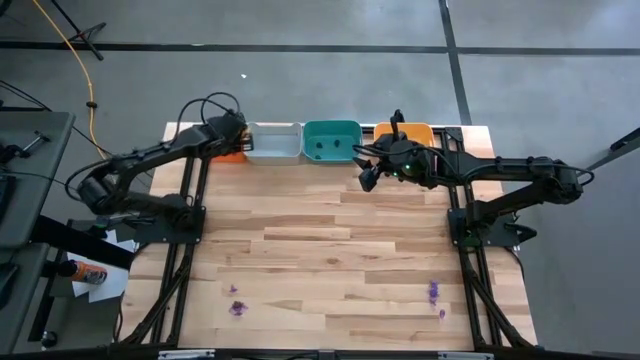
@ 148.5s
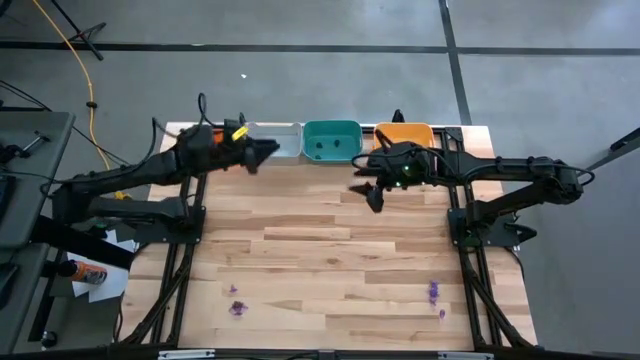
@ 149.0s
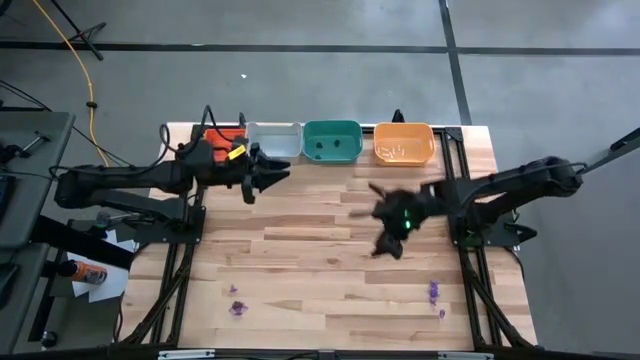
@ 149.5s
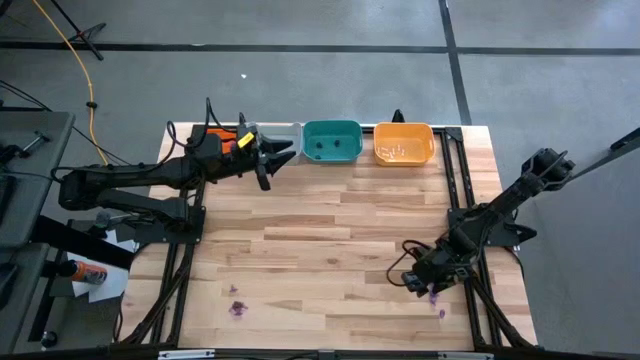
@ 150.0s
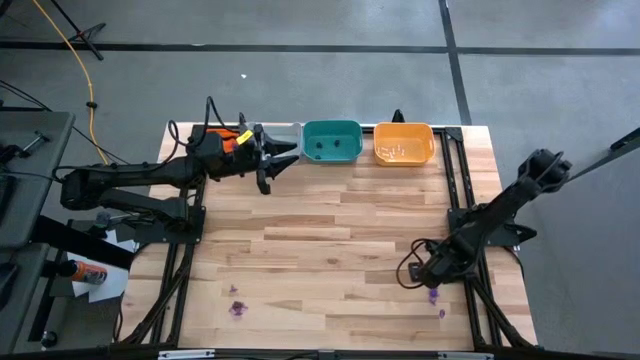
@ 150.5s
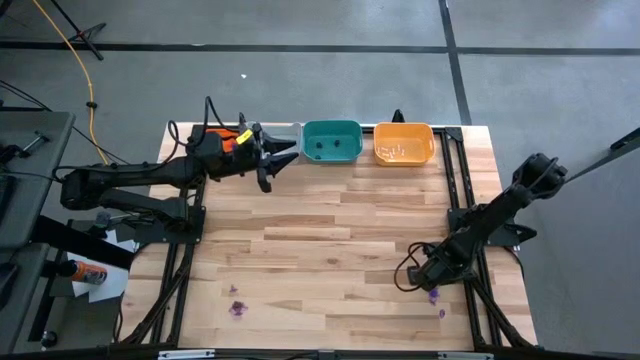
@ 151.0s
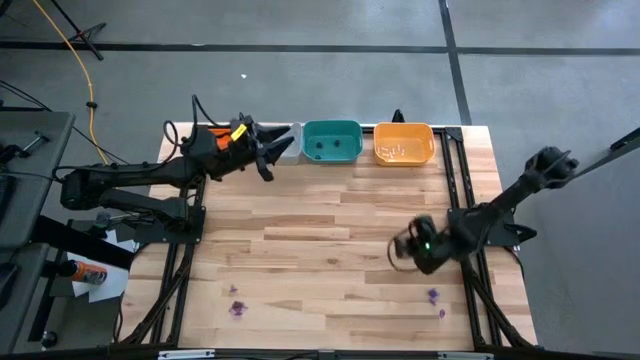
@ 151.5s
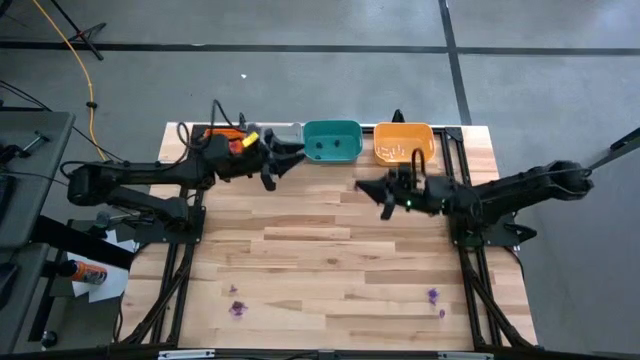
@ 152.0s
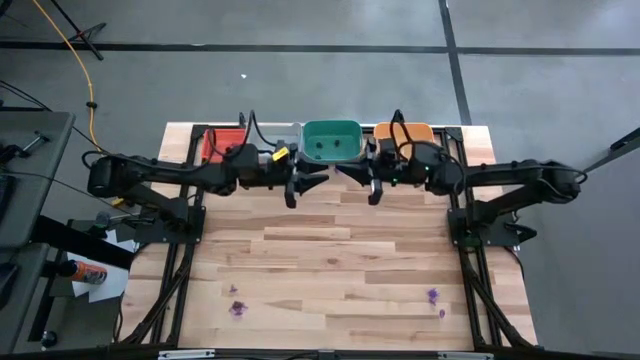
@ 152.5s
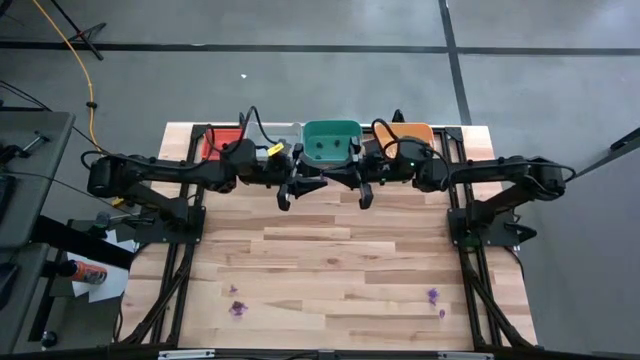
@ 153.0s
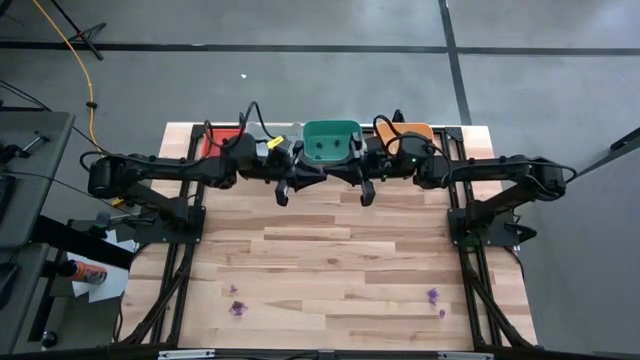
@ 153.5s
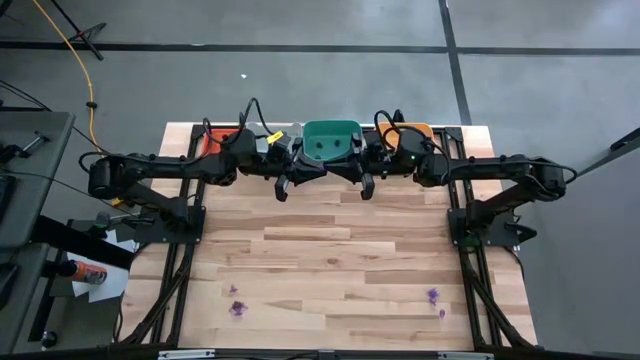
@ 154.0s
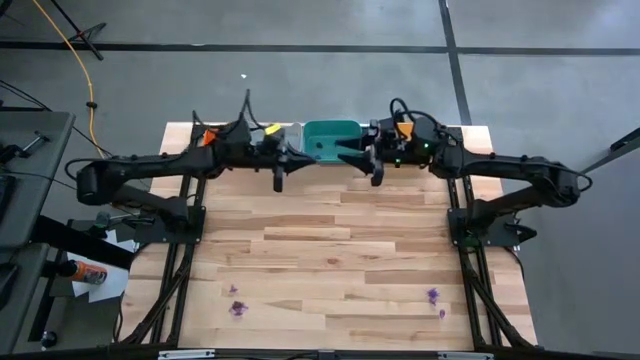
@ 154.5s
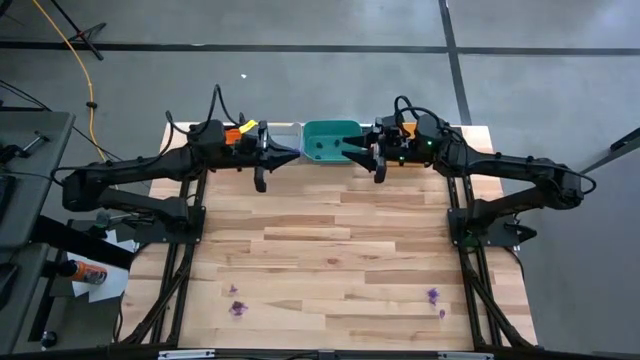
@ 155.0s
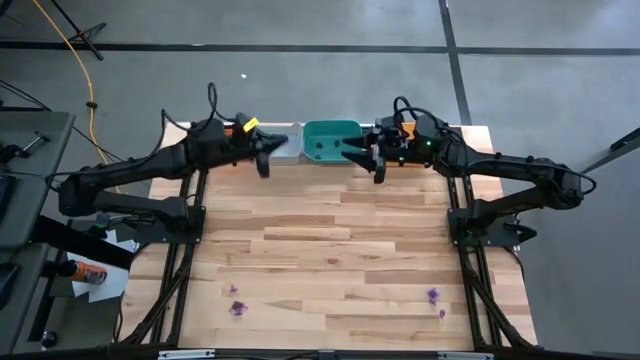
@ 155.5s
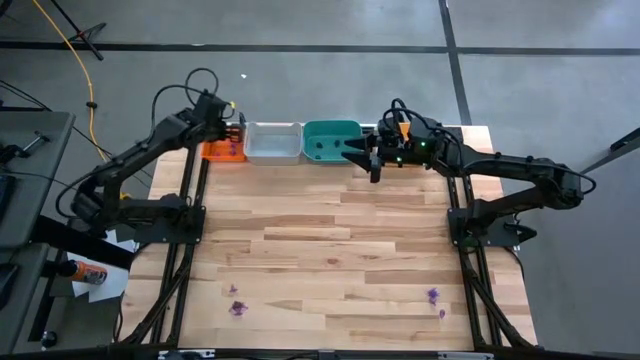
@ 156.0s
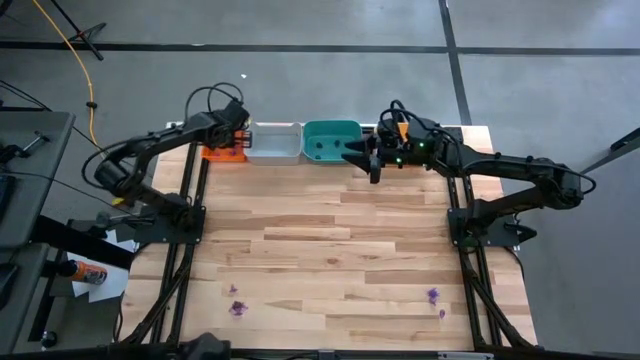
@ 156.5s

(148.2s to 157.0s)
Task: Sort Halloween decoration
Put the violet spider into the orange bin

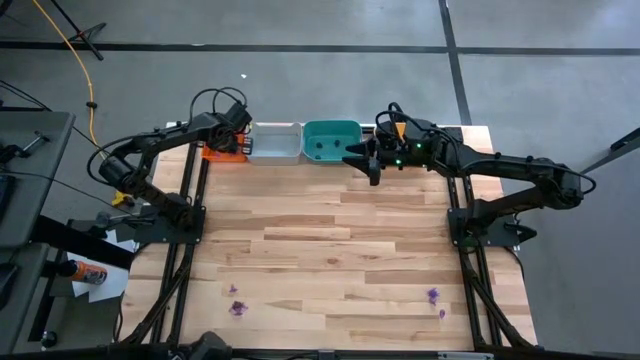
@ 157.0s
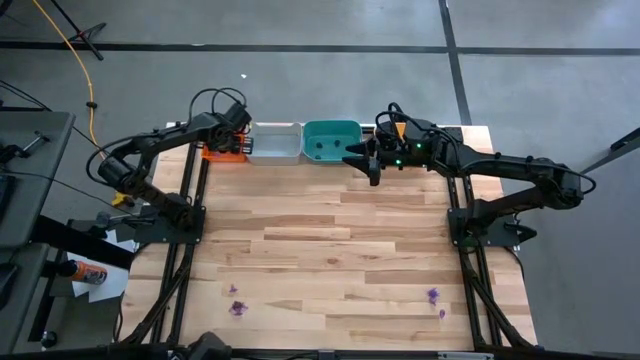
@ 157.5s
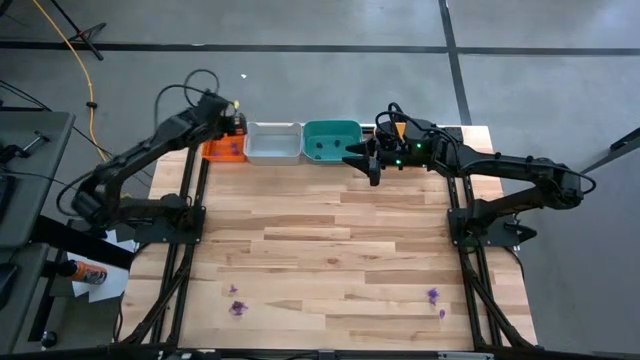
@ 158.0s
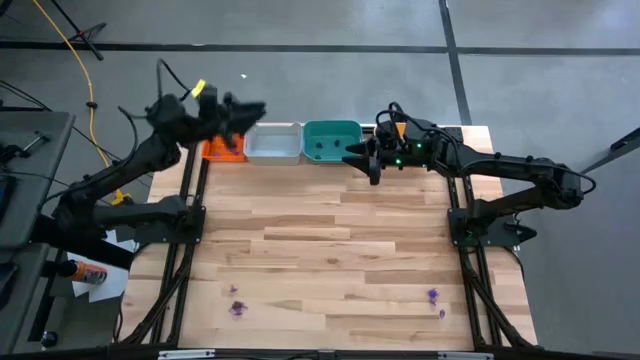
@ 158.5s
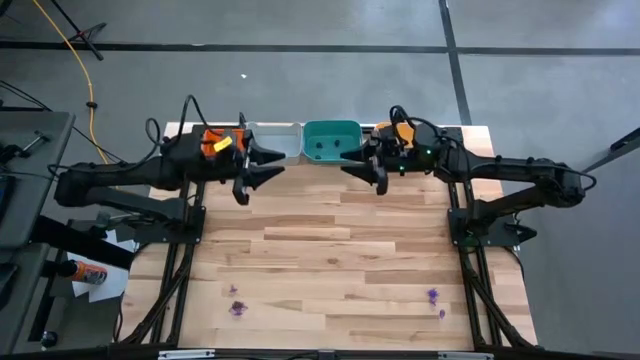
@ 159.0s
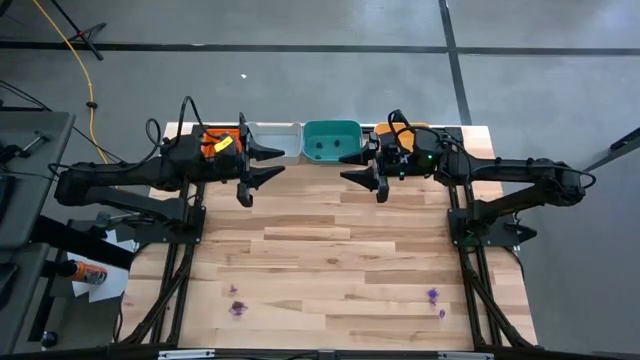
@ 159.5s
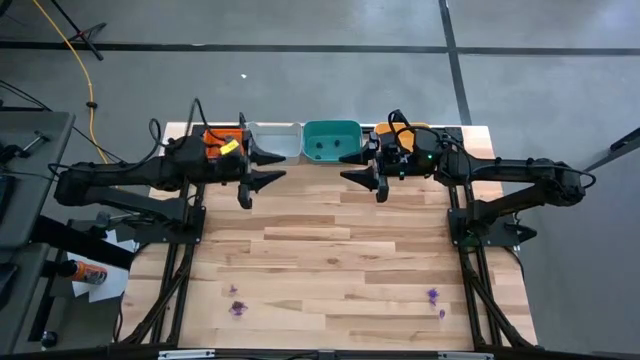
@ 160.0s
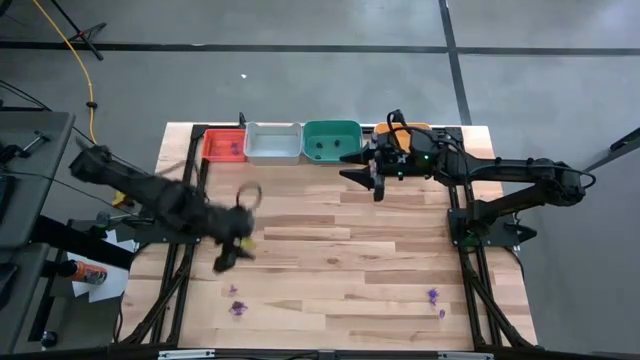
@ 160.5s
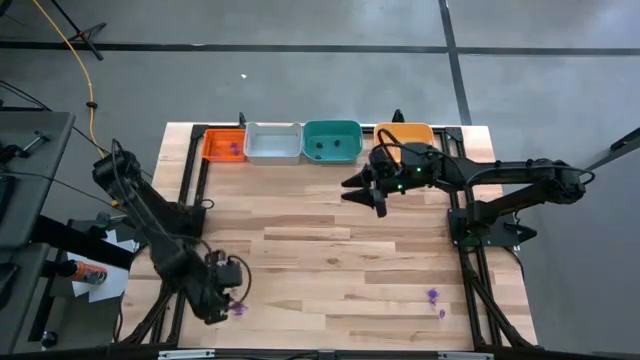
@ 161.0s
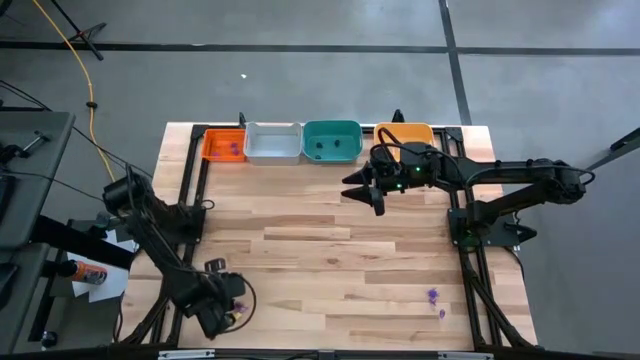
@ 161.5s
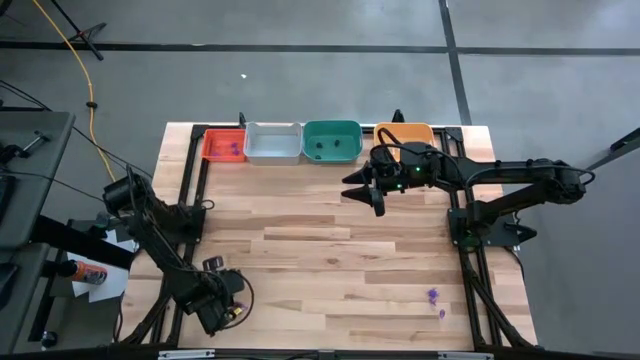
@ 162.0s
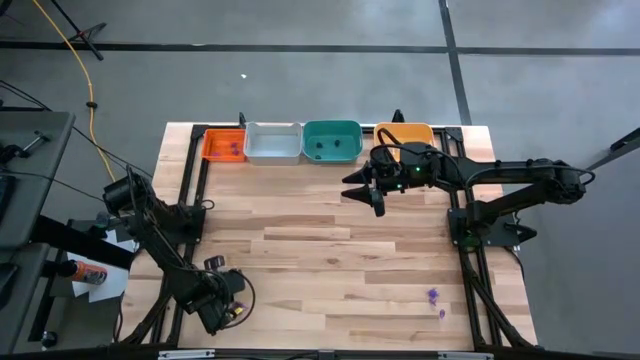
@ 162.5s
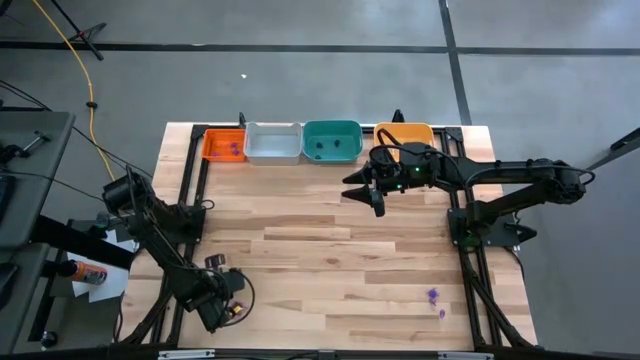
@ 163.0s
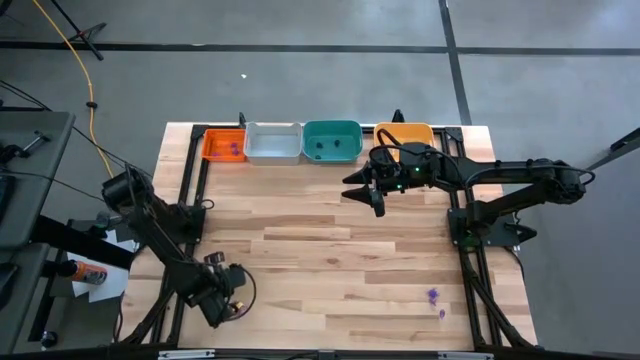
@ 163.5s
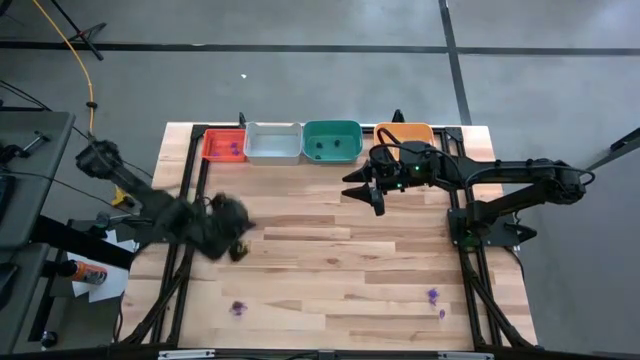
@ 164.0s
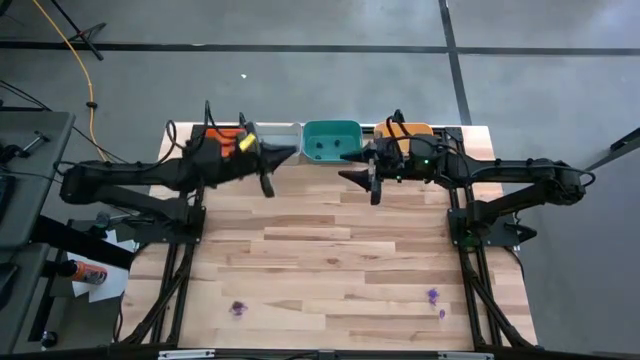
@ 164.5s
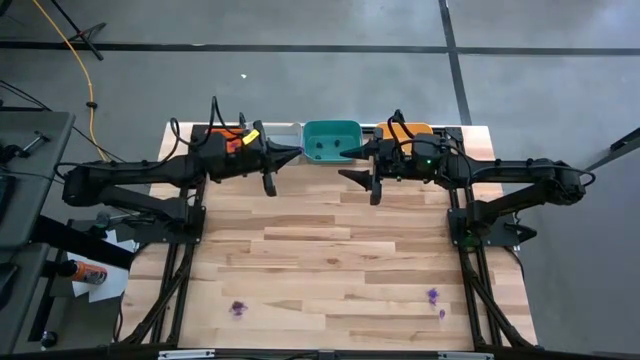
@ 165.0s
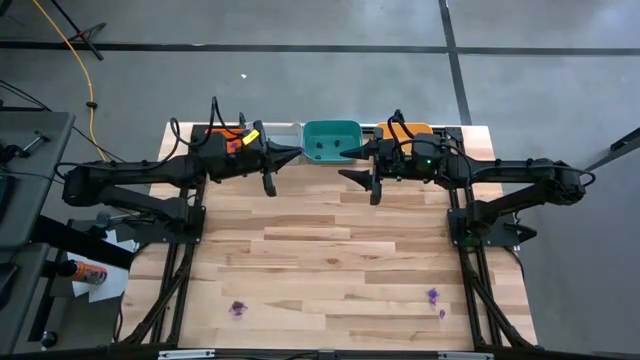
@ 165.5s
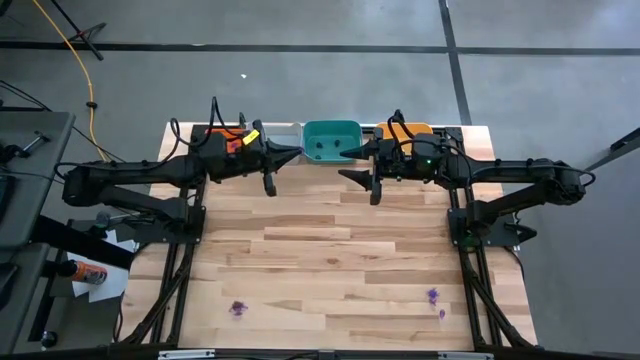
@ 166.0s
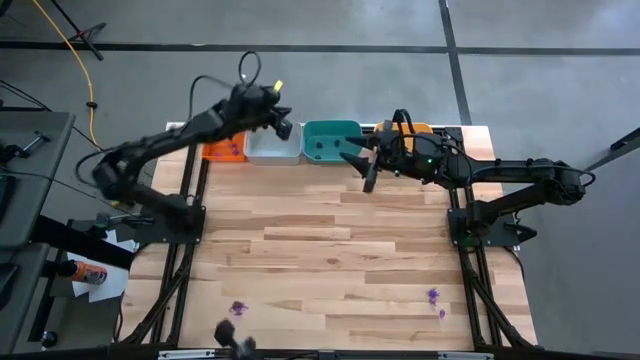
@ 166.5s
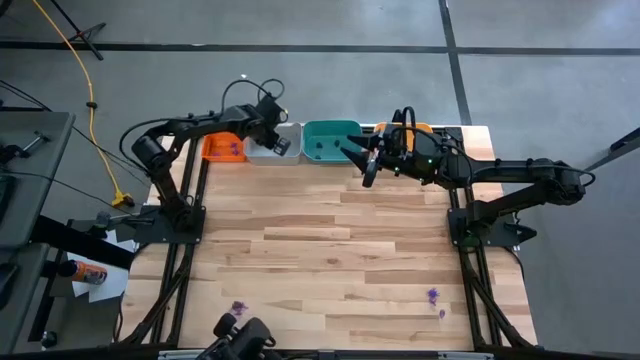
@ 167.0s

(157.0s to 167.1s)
Put the violet witch hat into the gray bin
